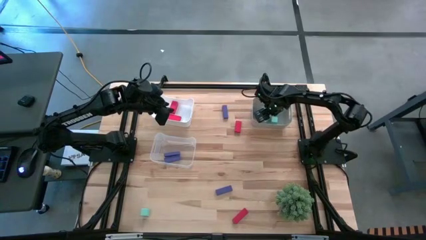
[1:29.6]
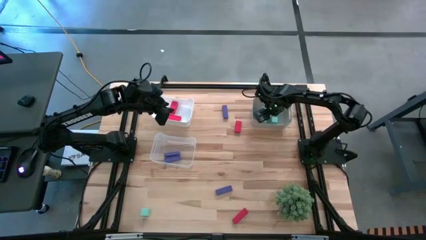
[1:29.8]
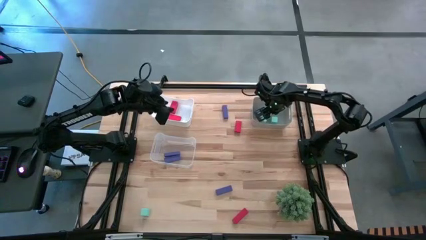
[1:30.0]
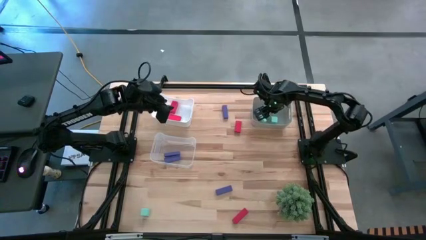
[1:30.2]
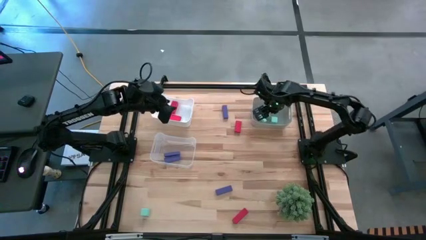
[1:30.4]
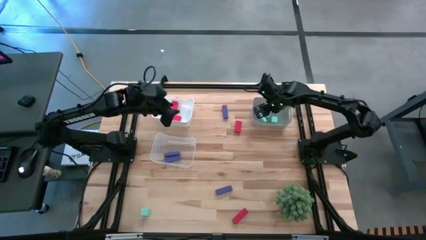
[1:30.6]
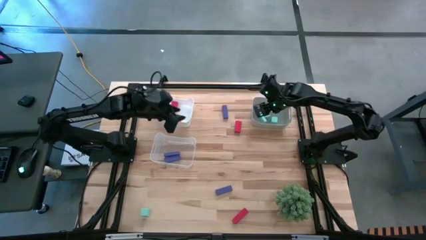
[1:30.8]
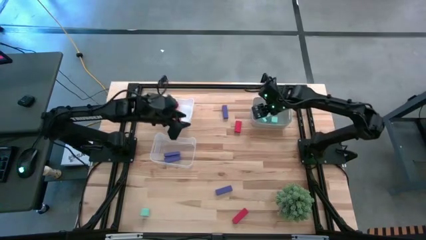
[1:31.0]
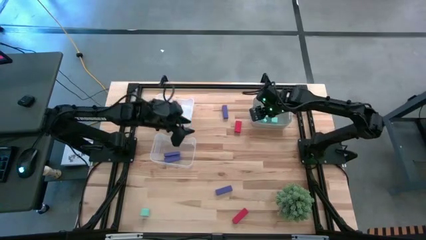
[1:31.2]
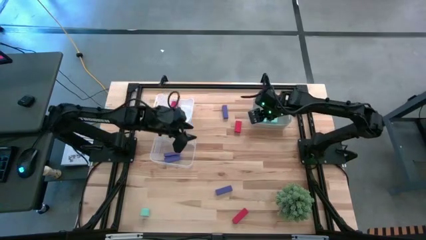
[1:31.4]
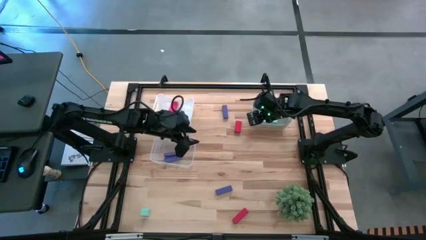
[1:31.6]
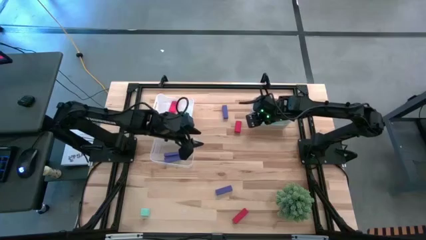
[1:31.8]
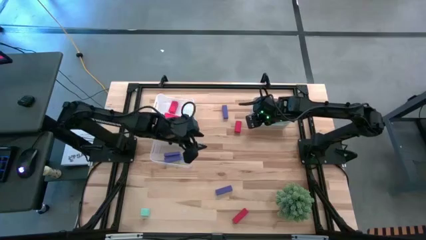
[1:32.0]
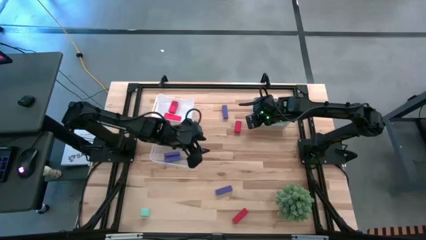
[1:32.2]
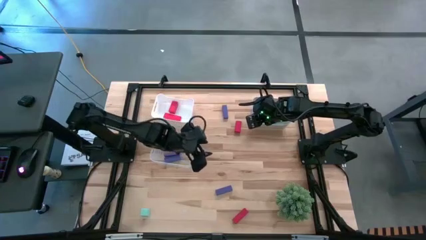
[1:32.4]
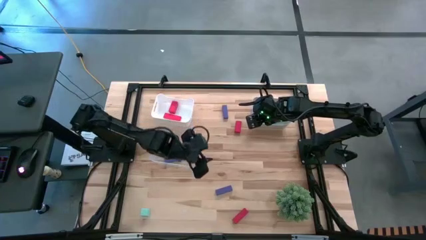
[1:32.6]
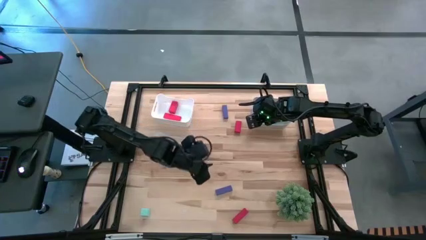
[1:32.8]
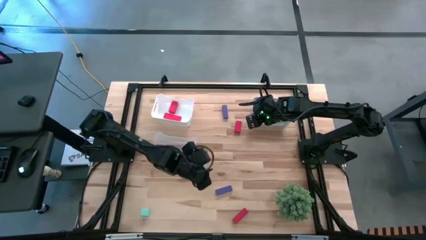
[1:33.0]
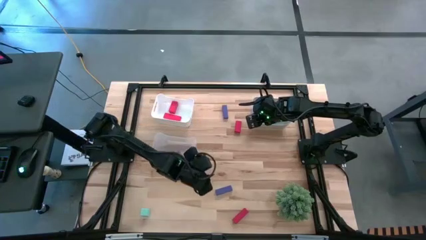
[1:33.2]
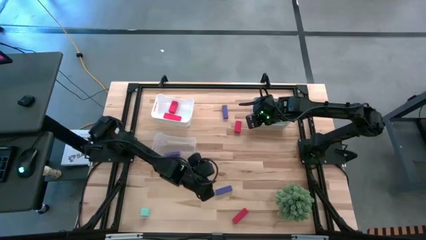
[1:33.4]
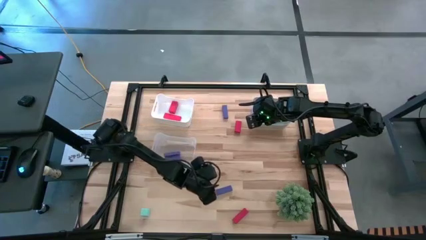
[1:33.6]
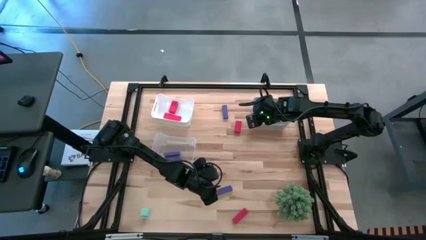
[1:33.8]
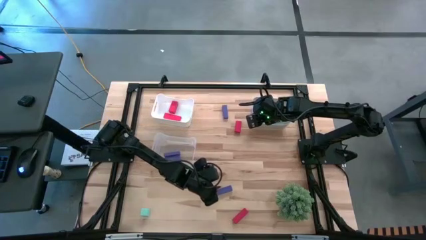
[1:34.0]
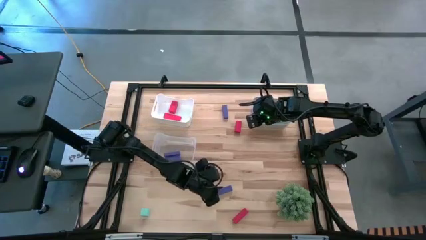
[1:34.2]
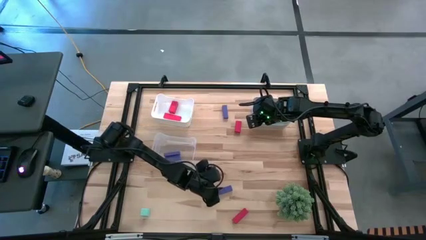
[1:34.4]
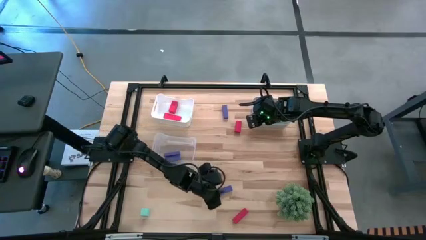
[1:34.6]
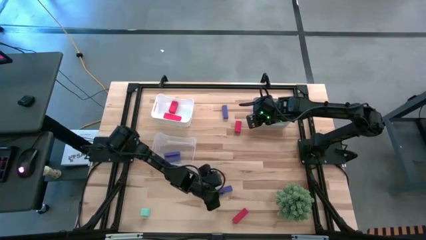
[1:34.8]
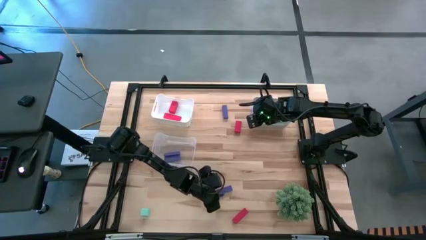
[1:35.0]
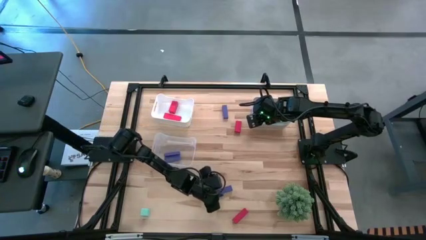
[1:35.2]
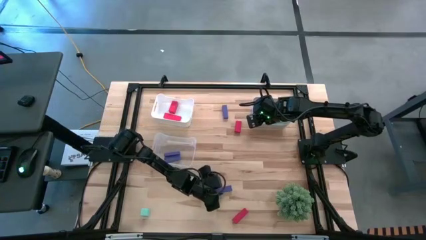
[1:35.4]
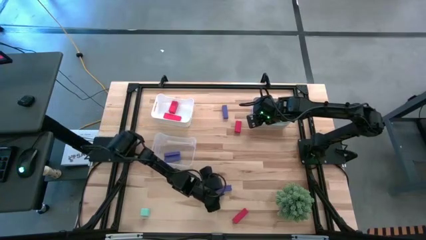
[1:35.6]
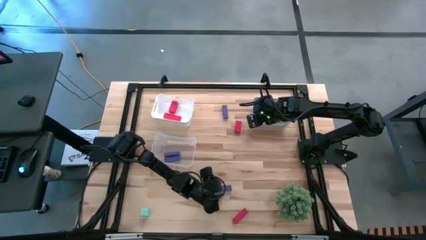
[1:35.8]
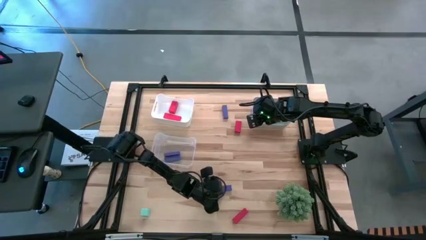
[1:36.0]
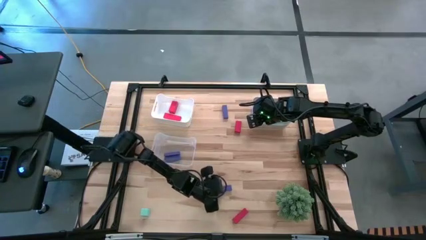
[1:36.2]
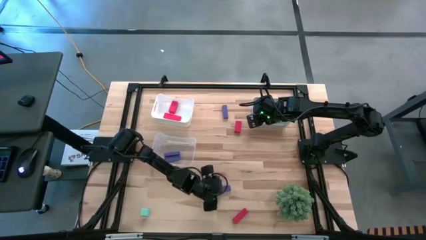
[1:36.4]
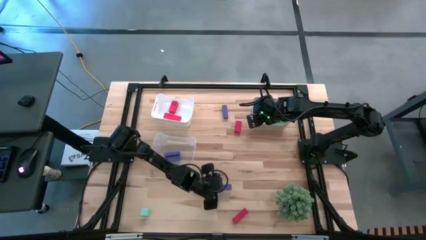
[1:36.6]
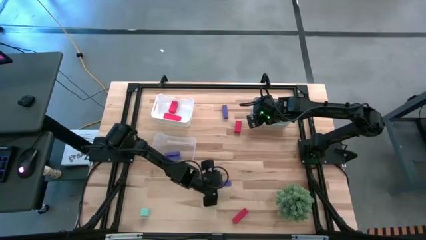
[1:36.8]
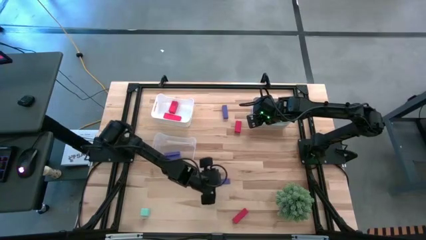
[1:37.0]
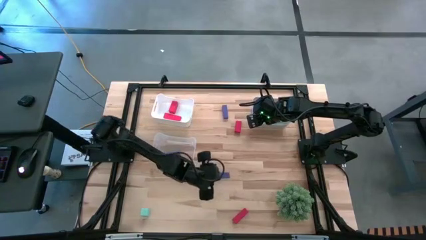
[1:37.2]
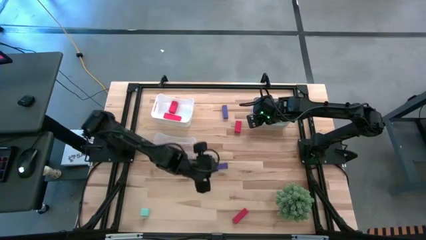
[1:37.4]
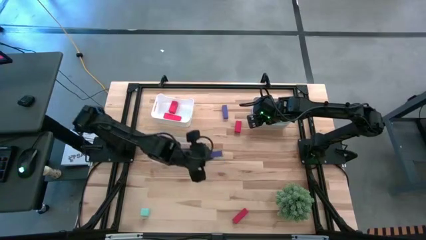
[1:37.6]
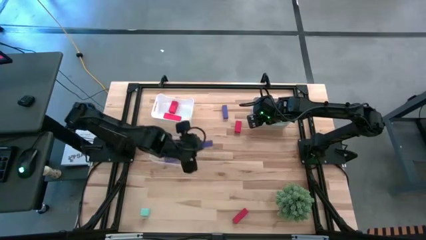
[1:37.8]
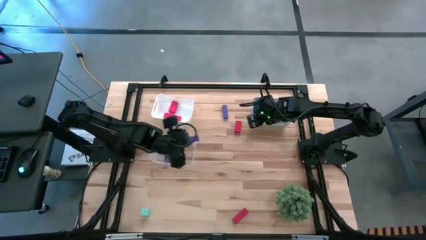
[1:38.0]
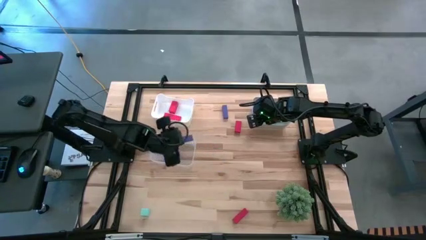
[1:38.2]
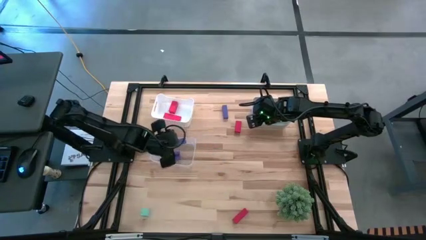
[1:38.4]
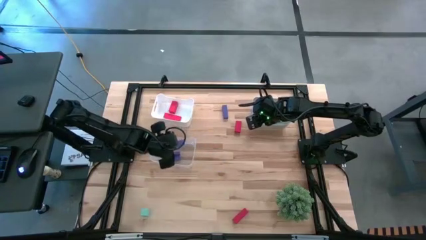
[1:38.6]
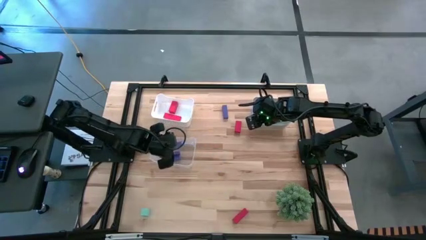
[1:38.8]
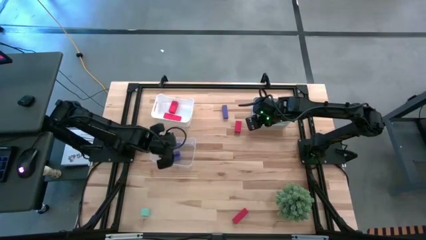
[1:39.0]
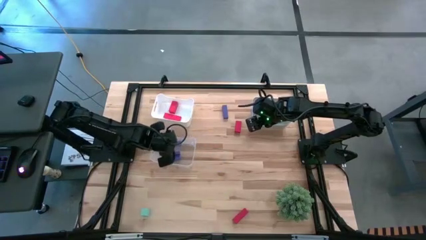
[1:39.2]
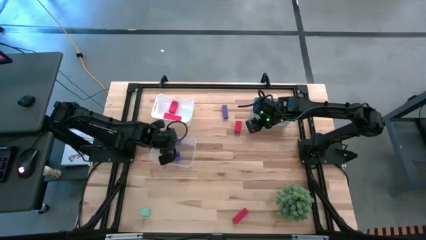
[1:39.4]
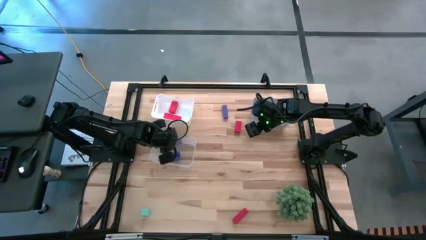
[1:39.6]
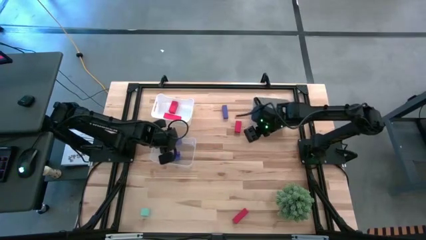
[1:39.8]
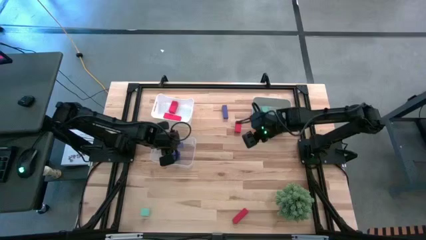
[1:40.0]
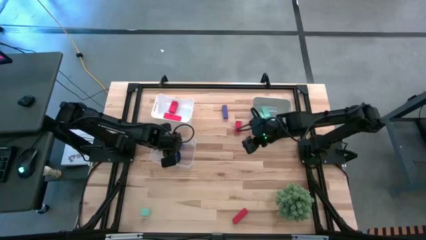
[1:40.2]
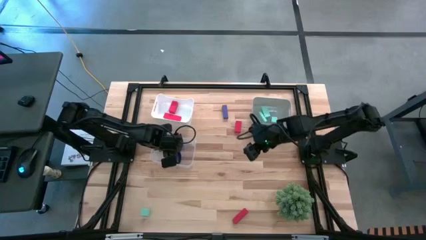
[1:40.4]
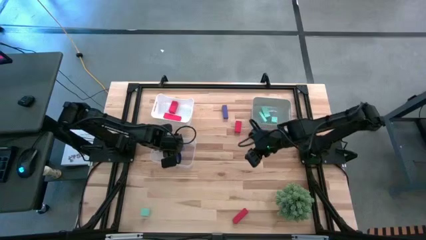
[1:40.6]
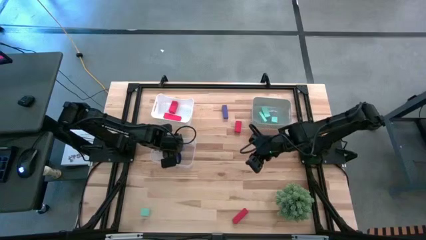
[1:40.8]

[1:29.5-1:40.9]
Task: Sort & place blocks by color
Put the purple block into the transparent bin
